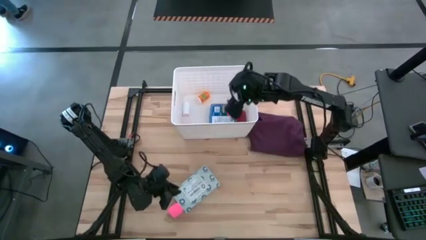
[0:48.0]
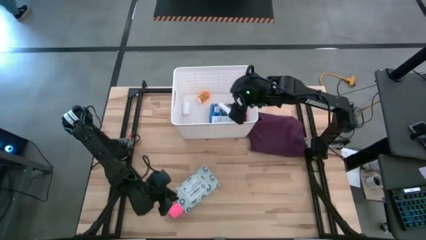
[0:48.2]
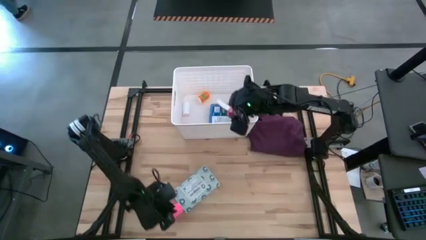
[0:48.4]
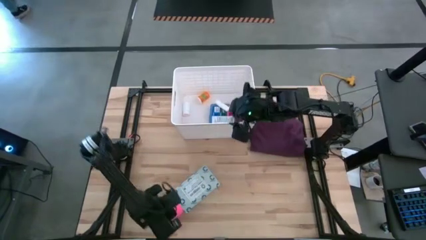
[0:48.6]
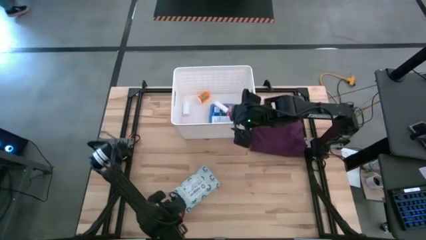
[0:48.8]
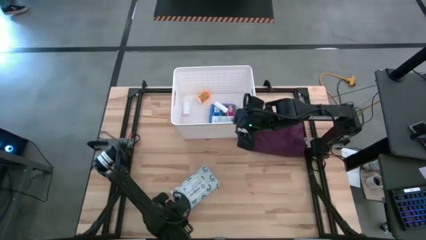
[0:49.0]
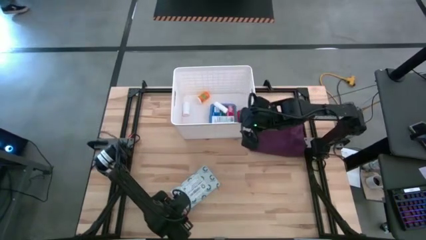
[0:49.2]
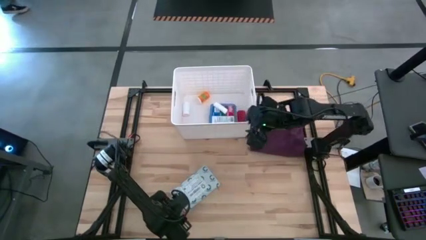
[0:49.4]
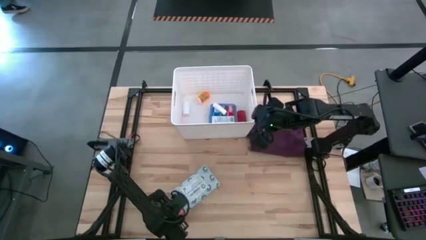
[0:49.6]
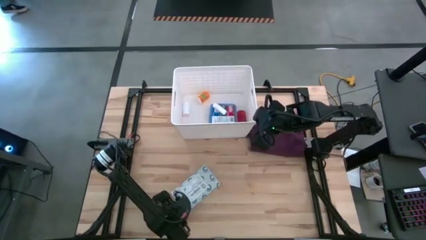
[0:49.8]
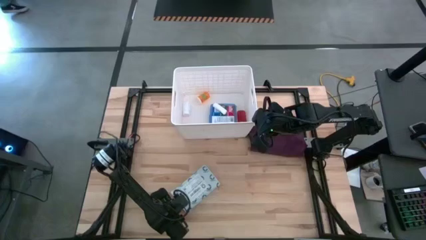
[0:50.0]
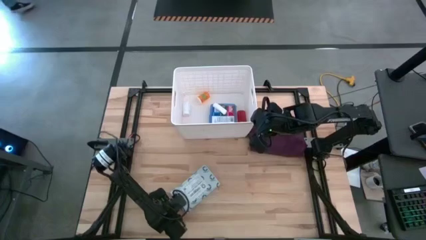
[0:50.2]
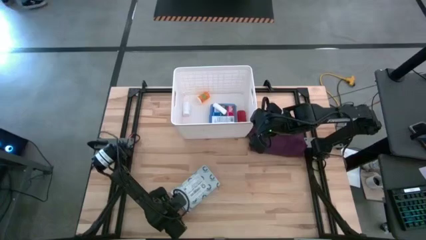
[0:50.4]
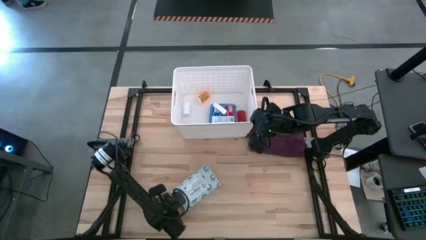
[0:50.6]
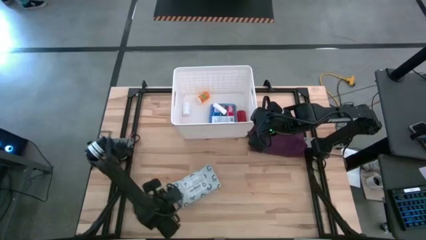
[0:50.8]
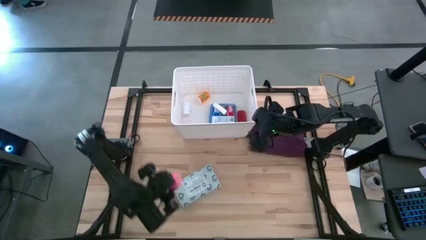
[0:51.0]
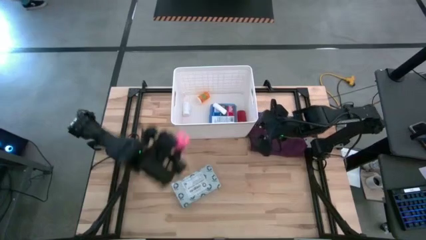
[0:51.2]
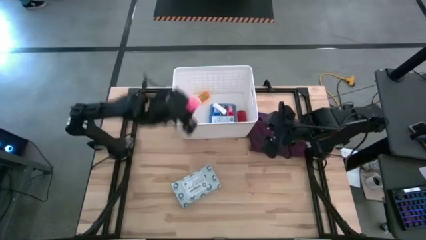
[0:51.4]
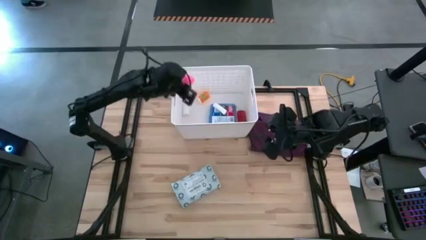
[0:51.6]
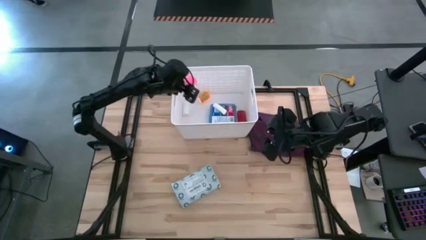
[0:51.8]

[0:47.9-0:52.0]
Task: Pick & place medical supplies in basket/bin
Put the pink bandage into the white bin

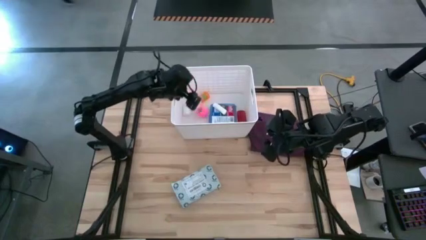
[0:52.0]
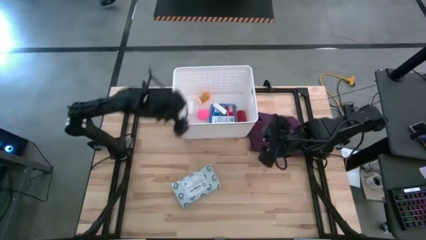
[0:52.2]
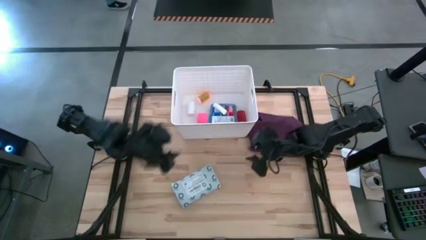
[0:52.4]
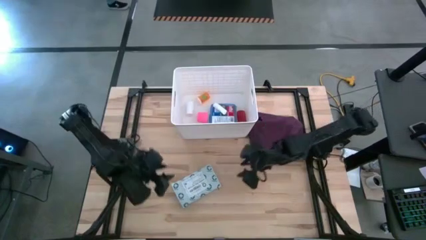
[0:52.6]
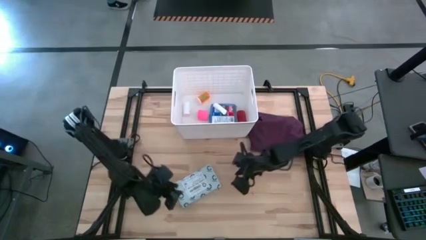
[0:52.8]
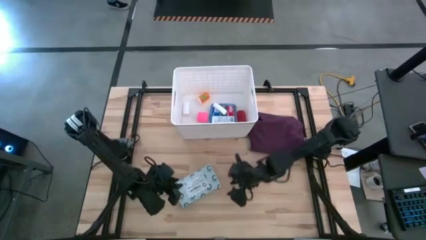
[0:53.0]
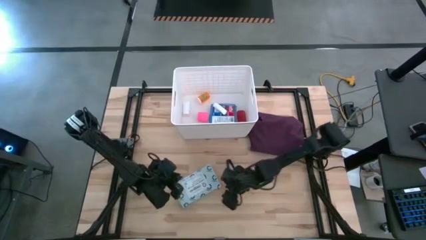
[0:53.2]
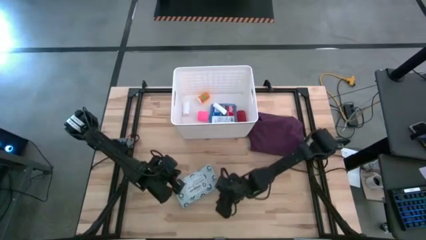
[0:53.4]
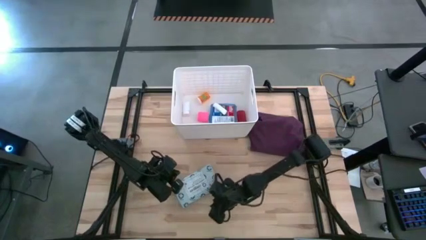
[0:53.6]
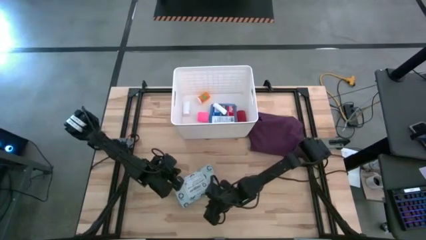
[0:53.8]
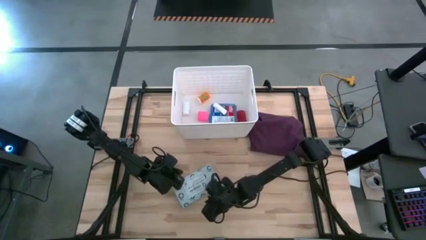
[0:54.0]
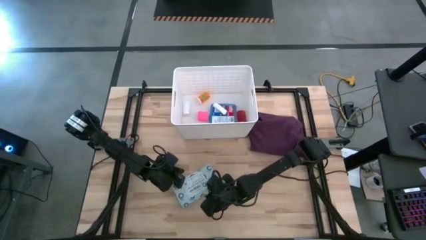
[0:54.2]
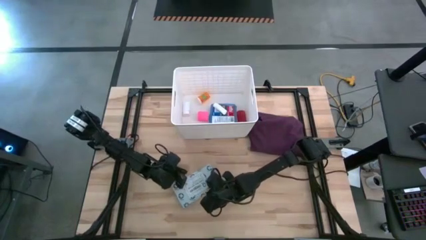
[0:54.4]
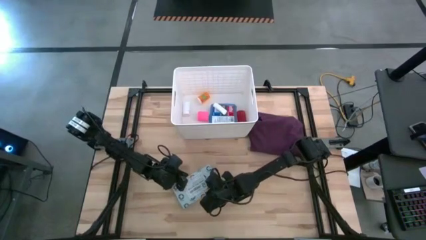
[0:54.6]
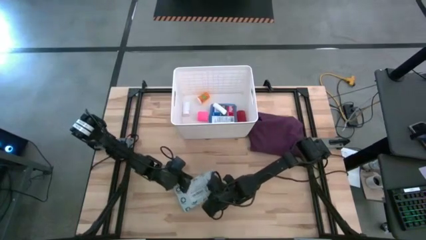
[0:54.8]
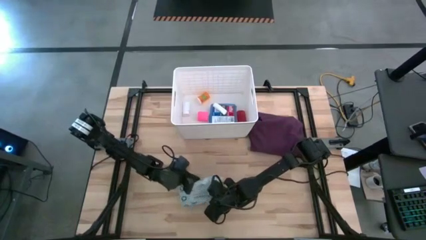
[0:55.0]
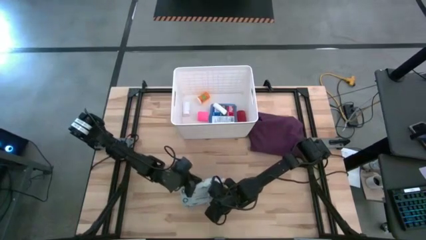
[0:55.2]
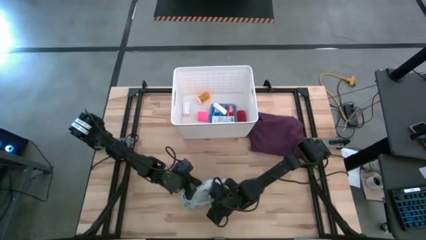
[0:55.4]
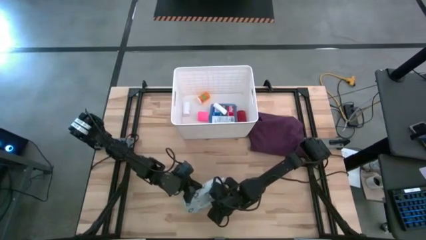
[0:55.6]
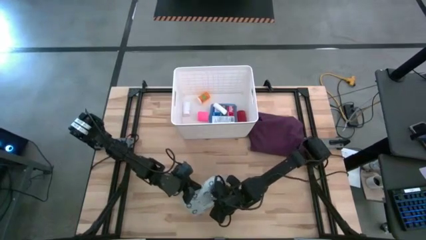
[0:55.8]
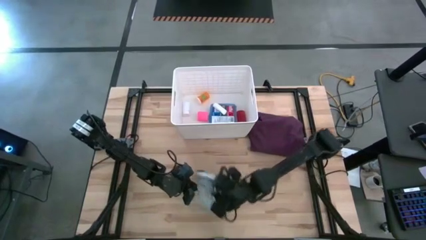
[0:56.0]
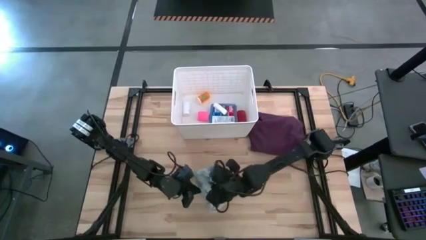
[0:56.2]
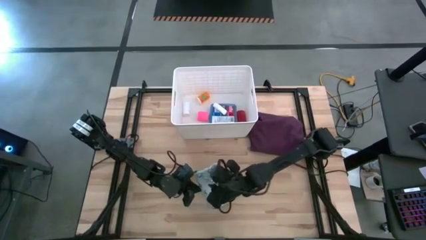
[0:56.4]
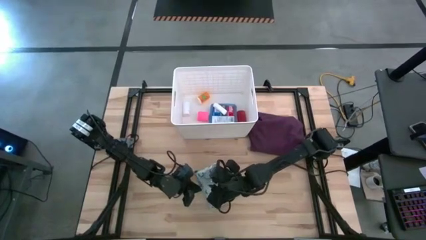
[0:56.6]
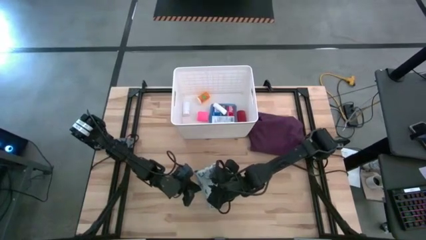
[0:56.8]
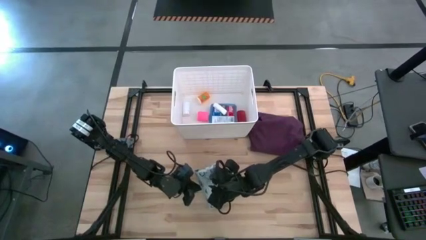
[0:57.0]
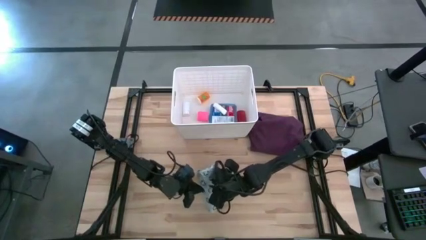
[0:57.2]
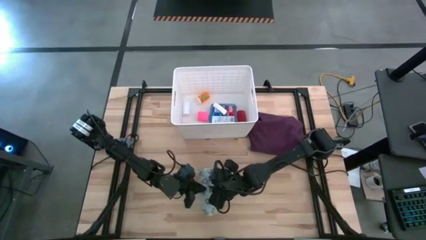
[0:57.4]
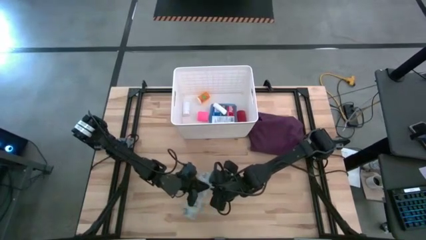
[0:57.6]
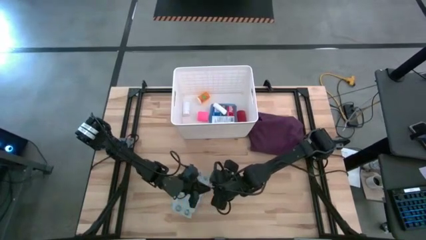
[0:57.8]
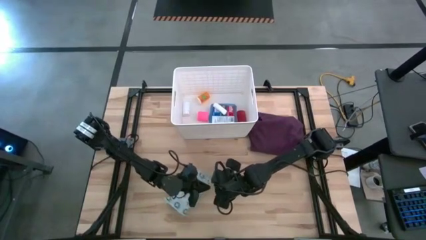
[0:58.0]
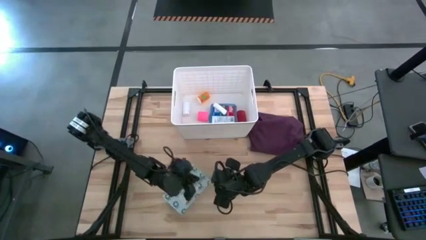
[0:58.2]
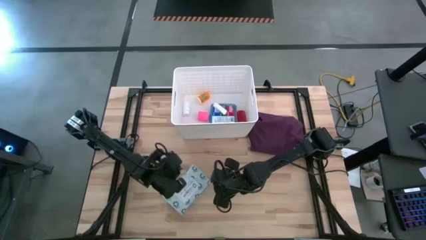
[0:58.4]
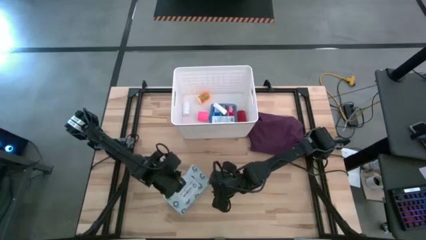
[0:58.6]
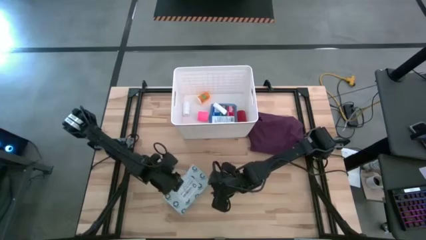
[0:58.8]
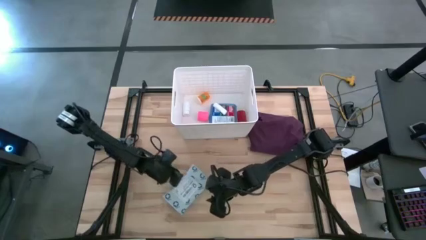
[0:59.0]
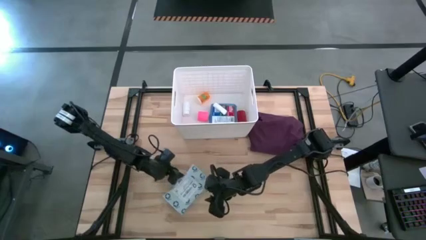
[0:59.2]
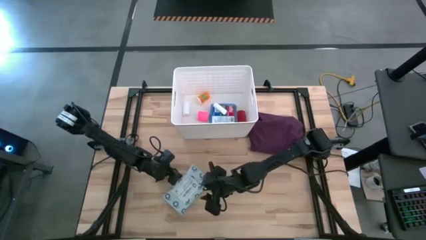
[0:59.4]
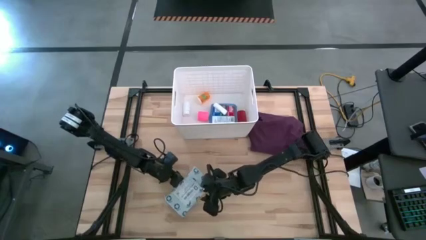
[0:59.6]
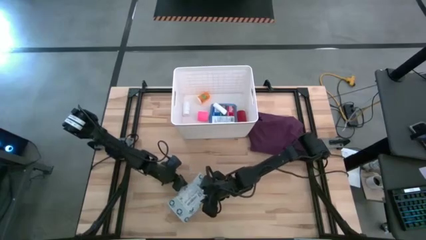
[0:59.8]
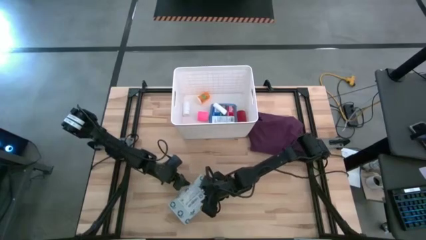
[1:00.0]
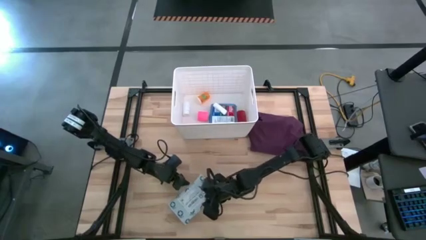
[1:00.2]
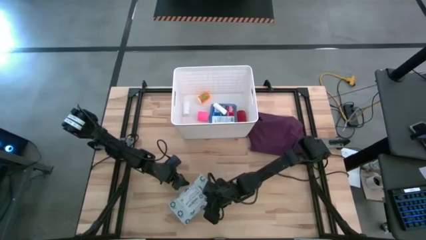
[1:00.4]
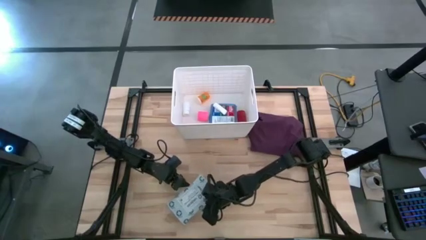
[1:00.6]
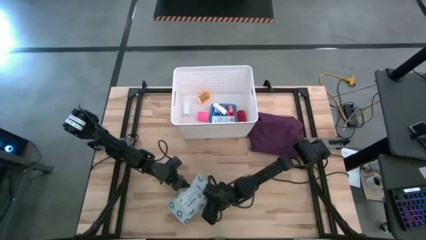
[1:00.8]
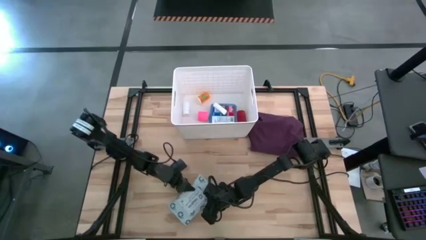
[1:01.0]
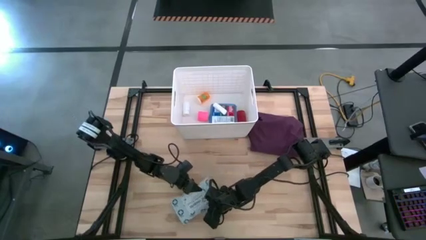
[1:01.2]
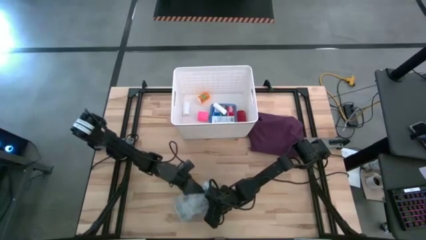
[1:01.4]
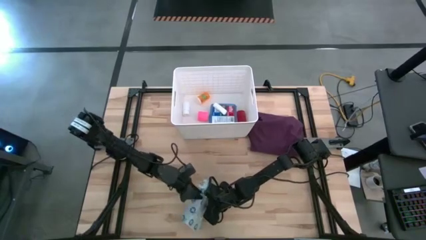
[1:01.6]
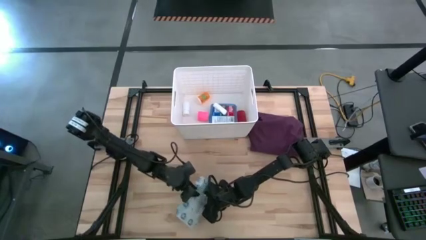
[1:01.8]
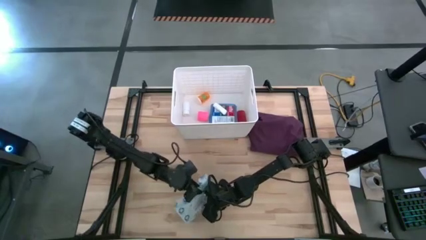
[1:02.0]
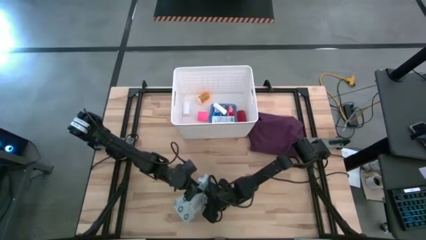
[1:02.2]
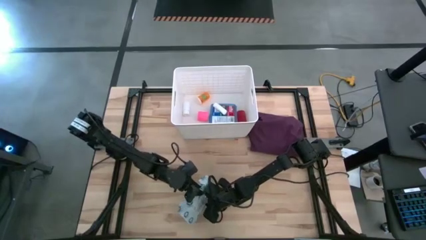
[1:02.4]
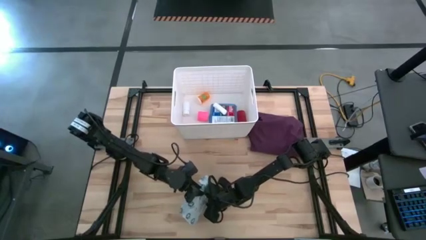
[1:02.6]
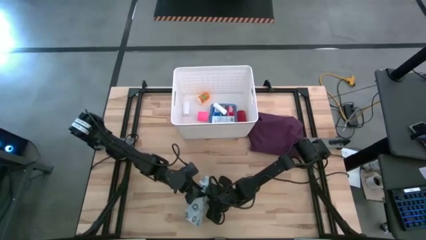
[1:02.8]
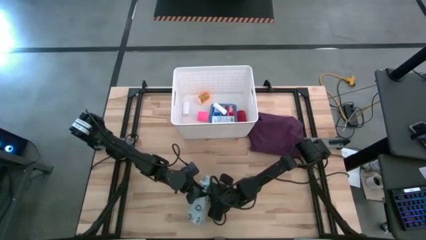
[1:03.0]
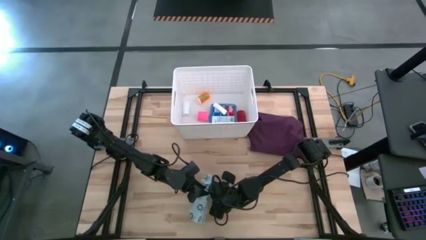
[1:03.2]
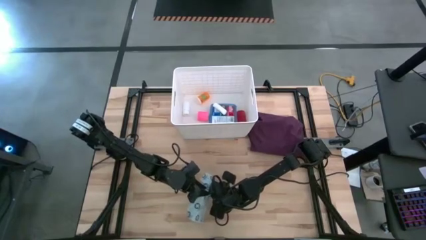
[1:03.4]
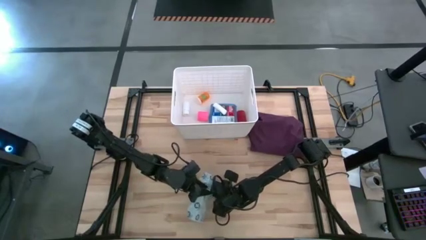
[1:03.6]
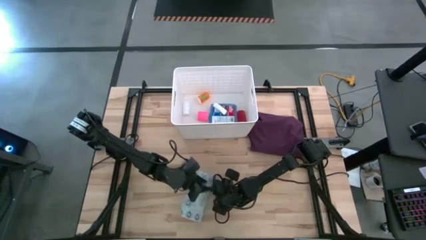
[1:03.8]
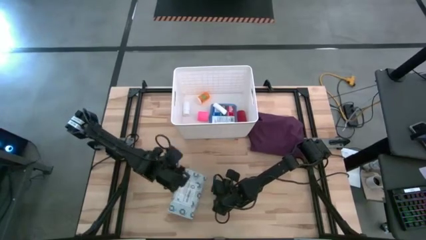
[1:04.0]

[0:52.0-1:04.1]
Put the white mailer bag into the white bin
